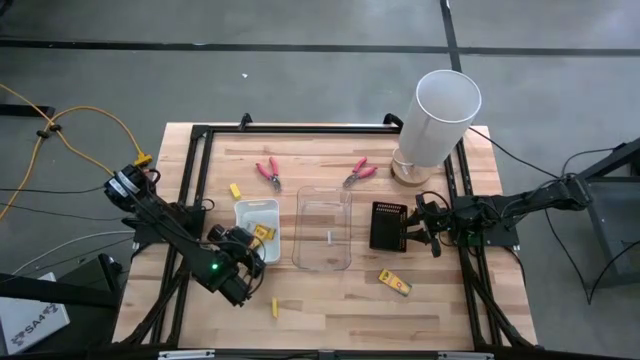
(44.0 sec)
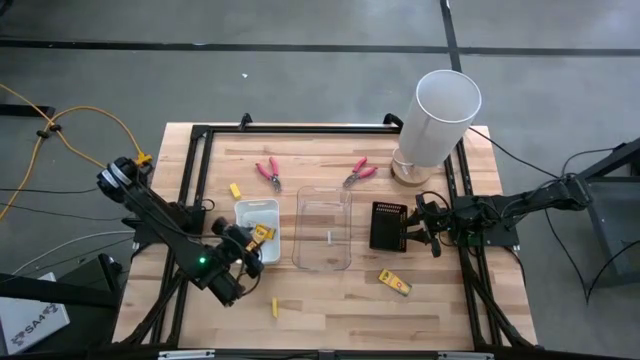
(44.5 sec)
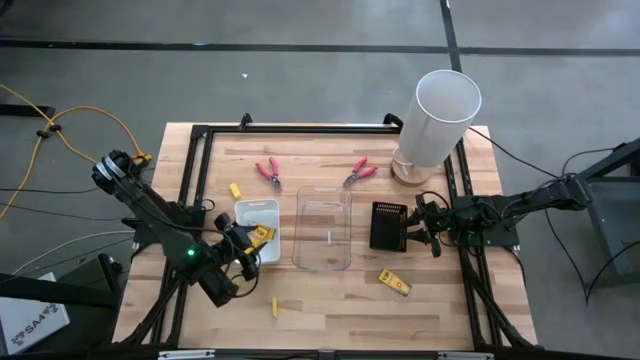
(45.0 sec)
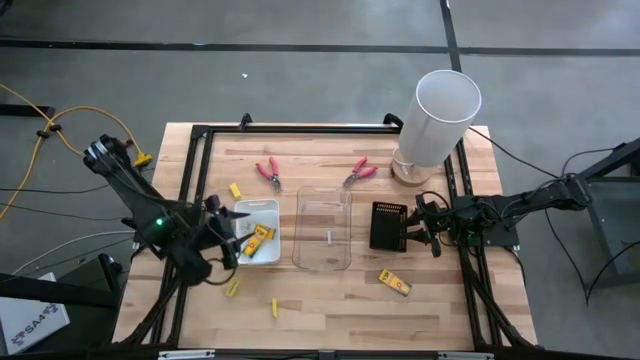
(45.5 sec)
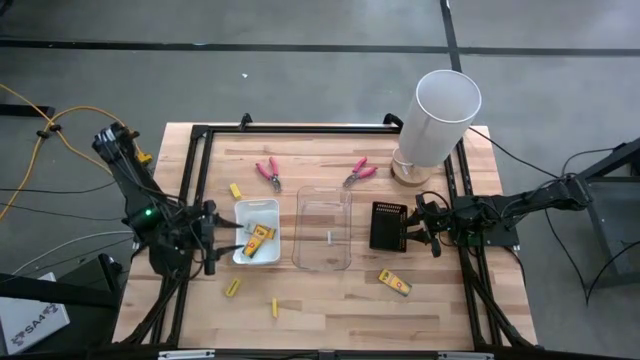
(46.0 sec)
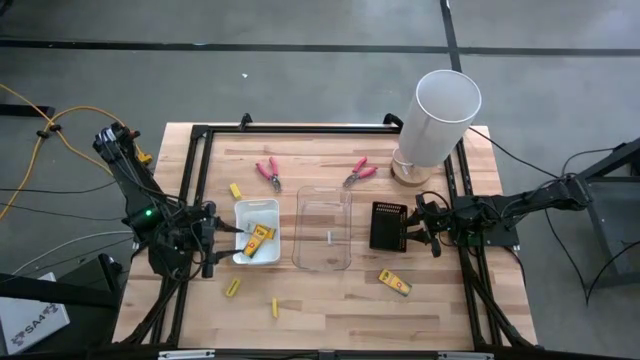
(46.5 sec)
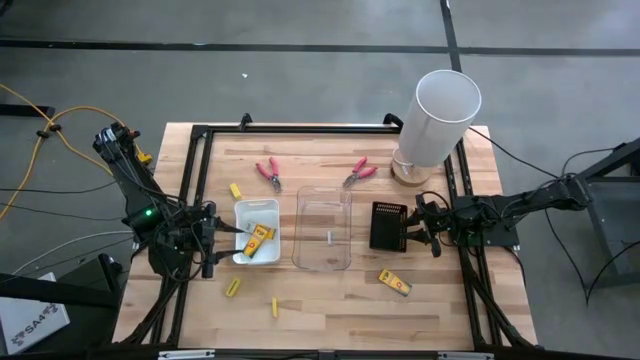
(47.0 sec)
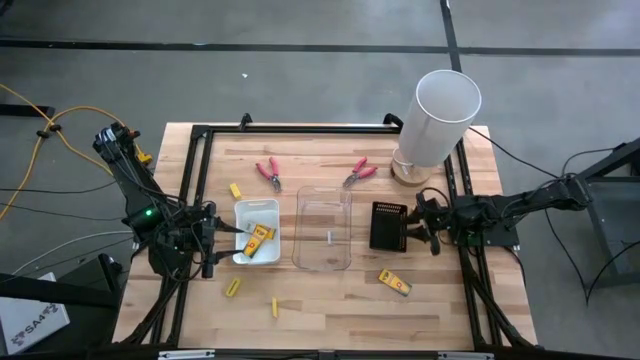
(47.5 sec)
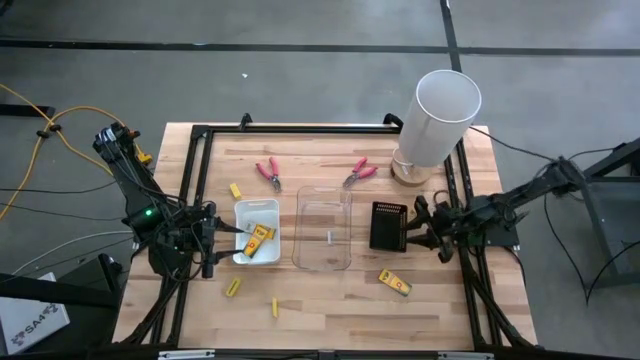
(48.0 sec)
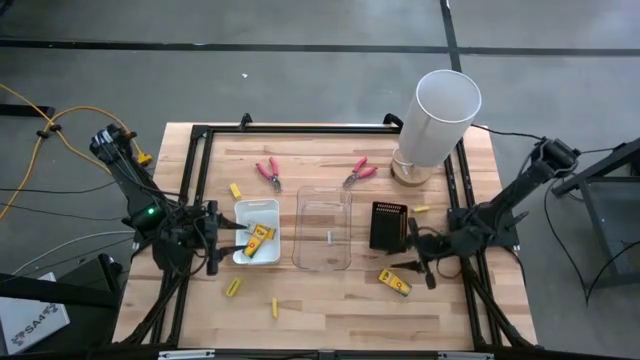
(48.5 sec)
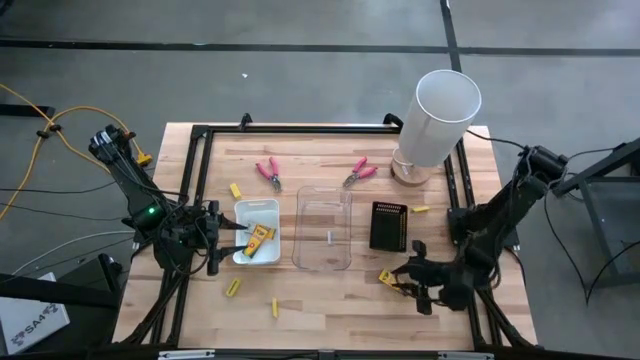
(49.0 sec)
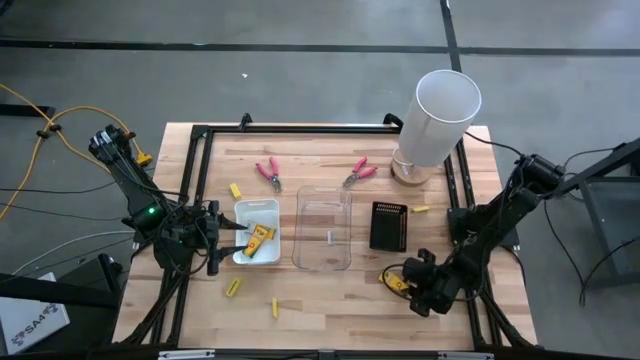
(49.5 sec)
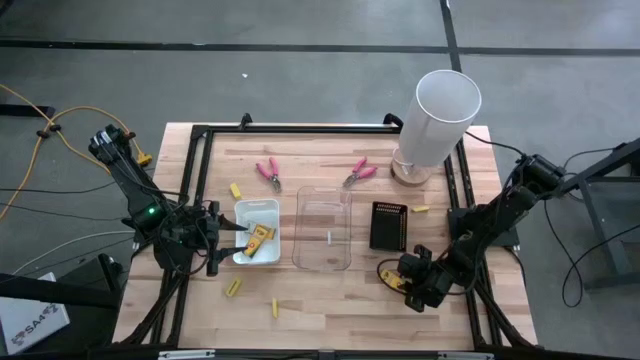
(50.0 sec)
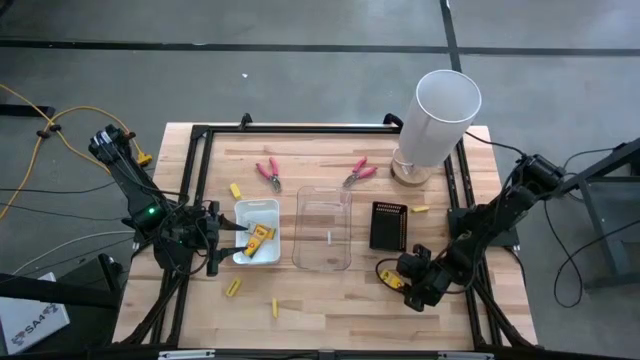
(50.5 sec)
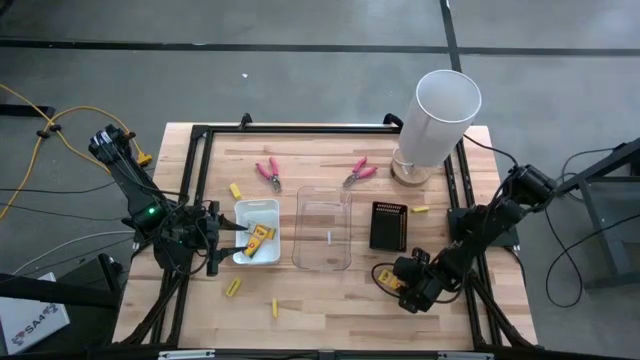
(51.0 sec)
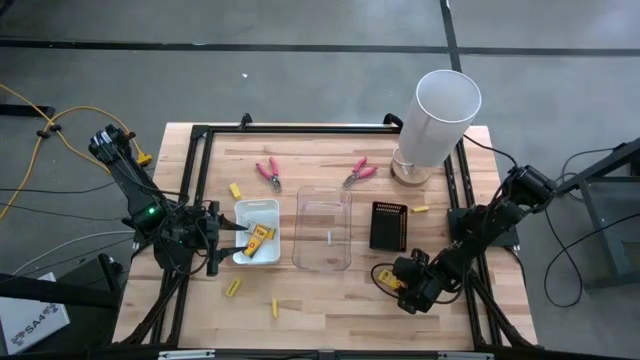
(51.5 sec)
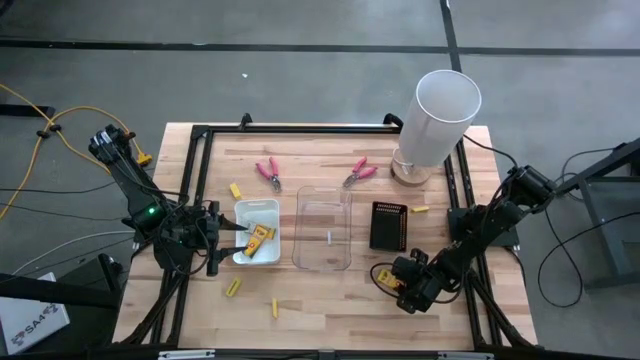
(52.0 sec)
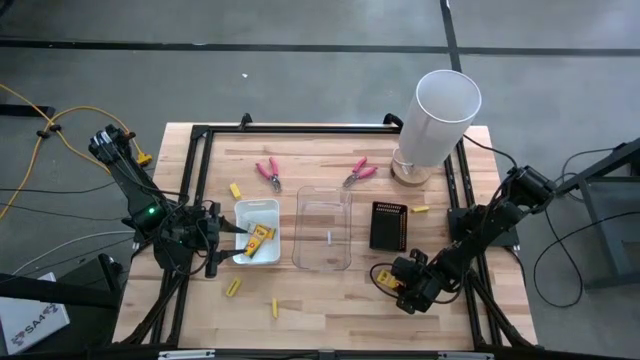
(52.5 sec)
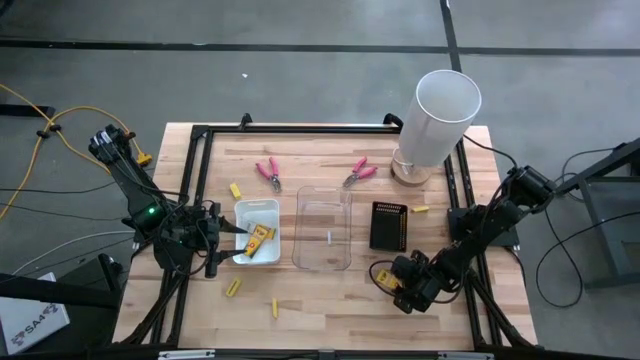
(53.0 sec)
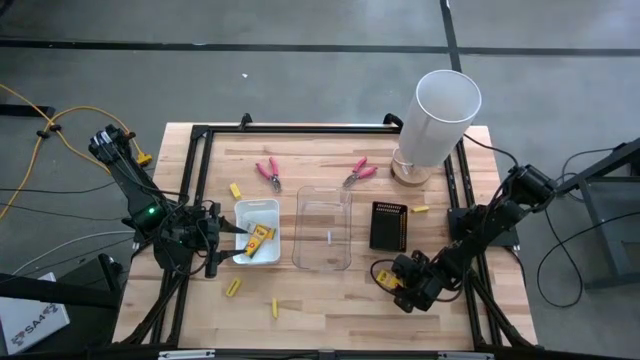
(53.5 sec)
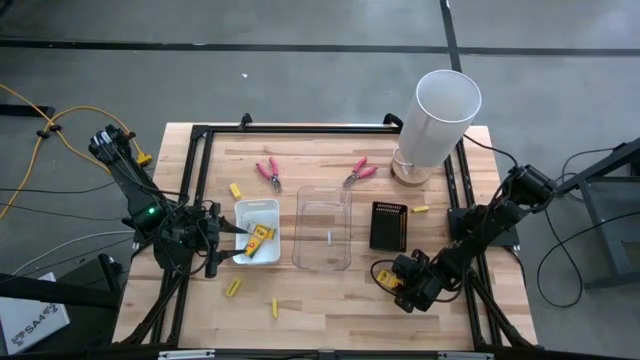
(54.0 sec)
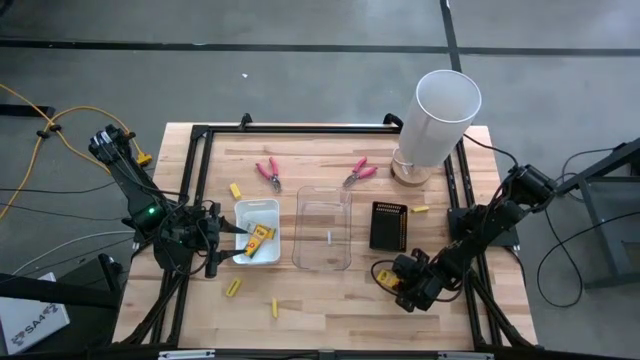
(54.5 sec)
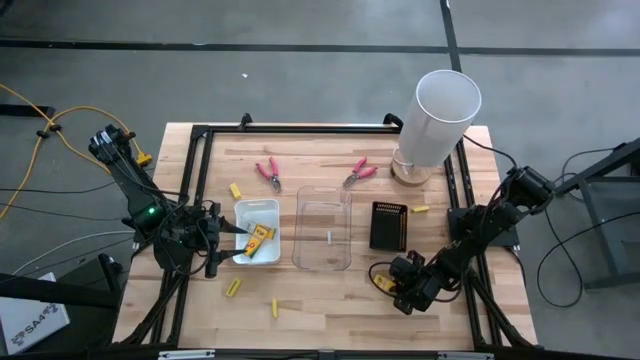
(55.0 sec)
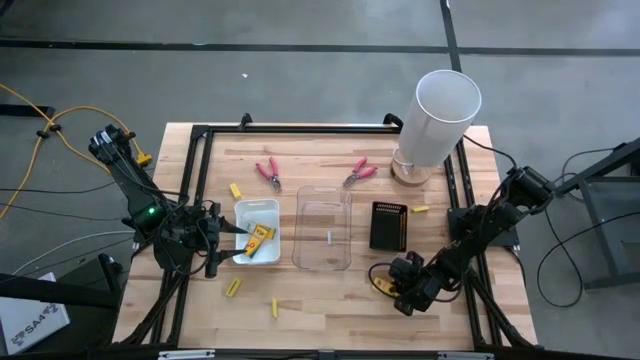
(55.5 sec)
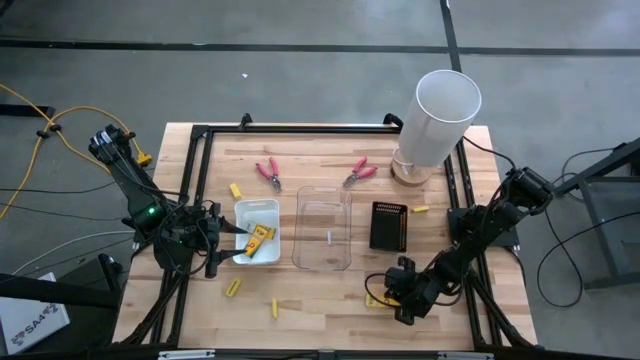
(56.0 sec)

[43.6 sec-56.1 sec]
Task: Pick & Place School Supplies
Put the crayon box into the white bin

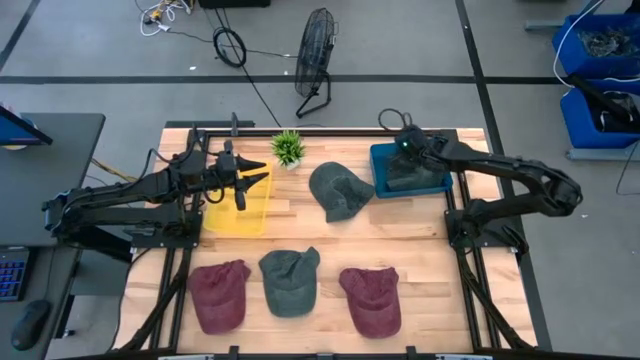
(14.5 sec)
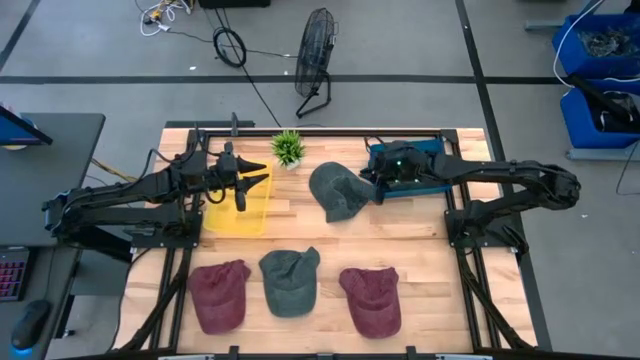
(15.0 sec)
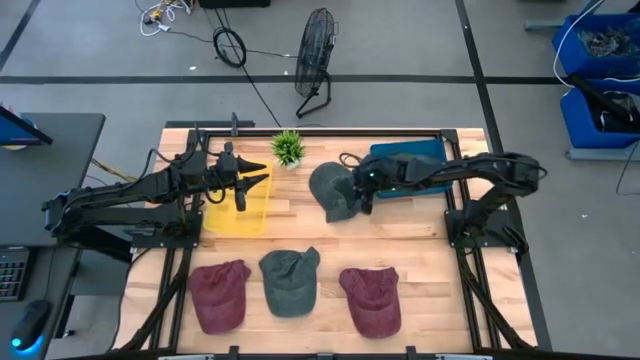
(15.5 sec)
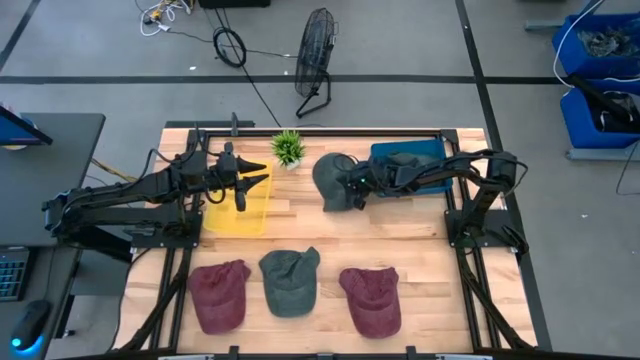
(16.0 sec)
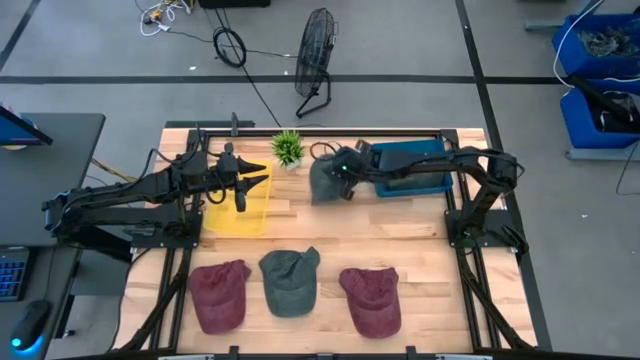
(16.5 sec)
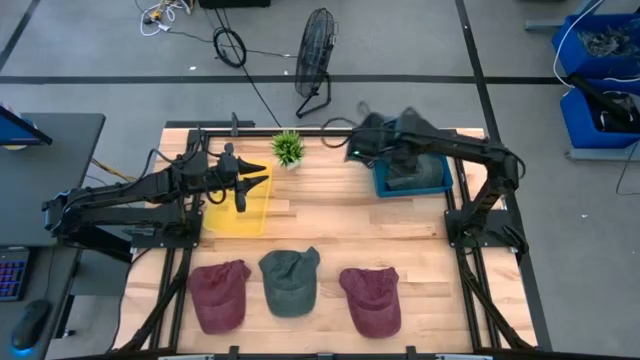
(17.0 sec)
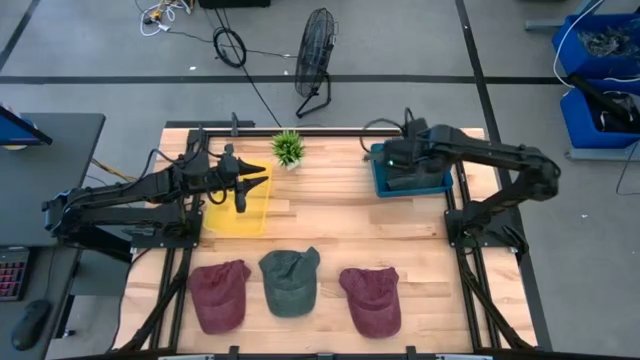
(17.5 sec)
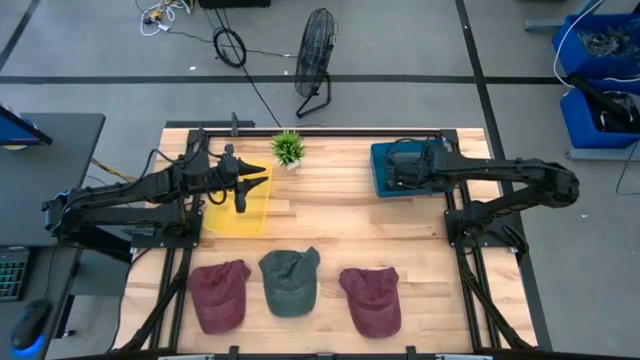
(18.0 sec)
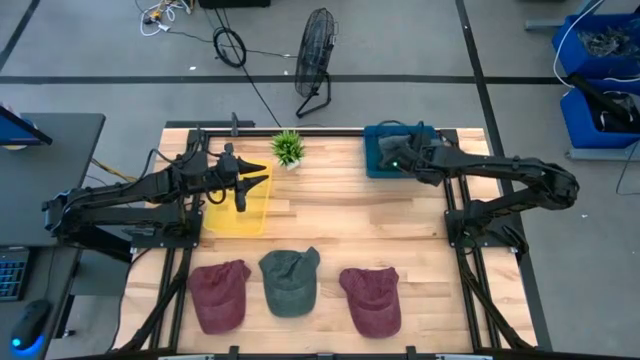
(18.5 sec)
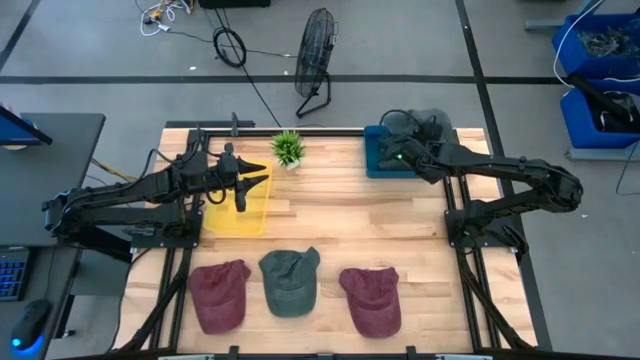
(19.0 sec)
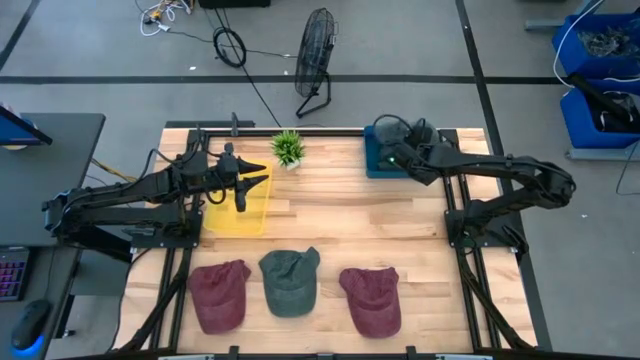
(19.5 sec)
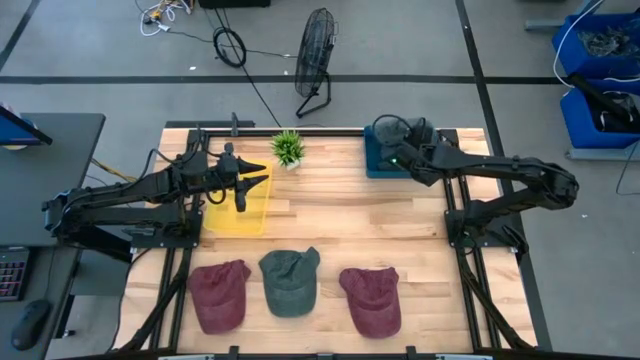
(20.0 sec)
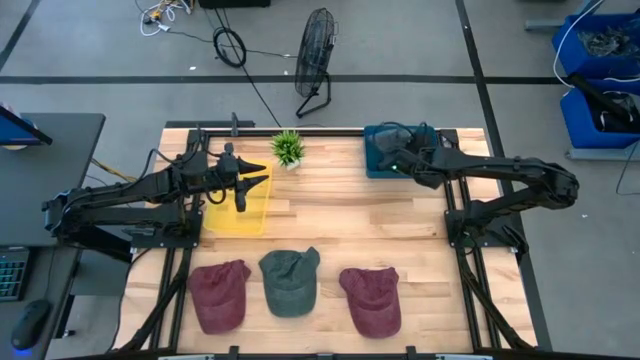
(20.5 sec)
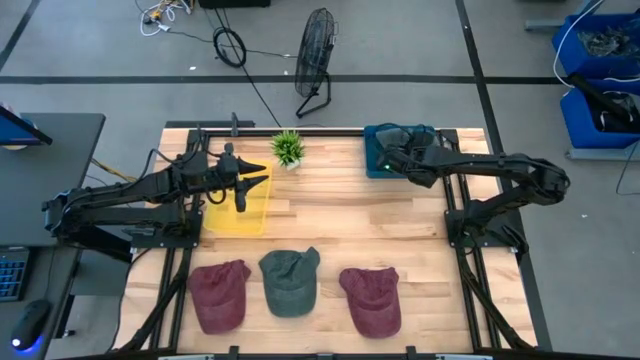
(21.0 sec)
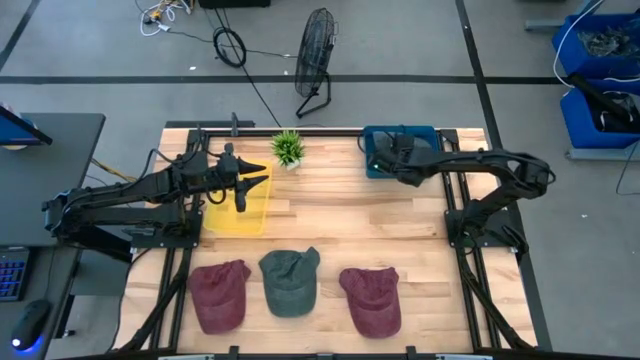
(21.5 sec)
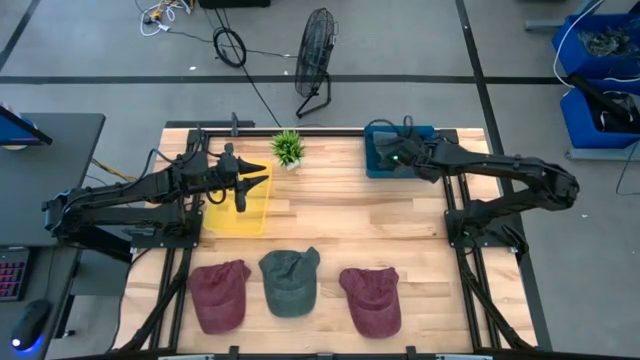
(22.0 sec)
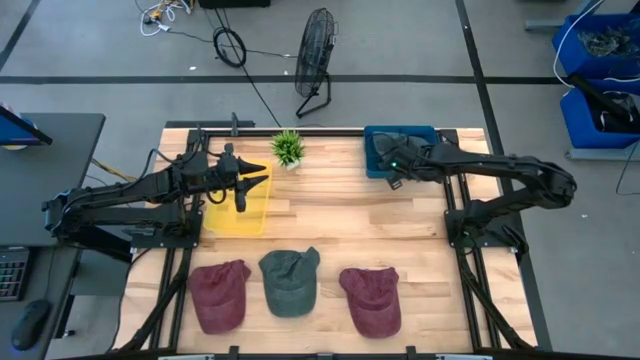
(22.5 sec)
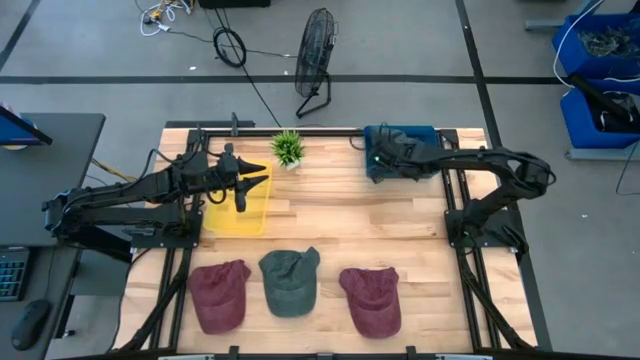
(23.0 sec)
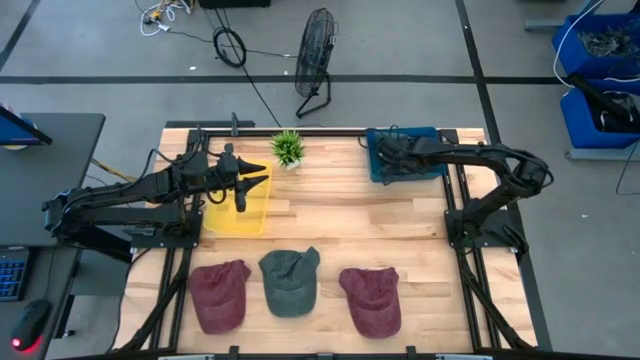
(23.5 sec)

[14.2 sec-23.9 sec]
Task: Pick & Place hat
Put the top gray cap into the blue bin
